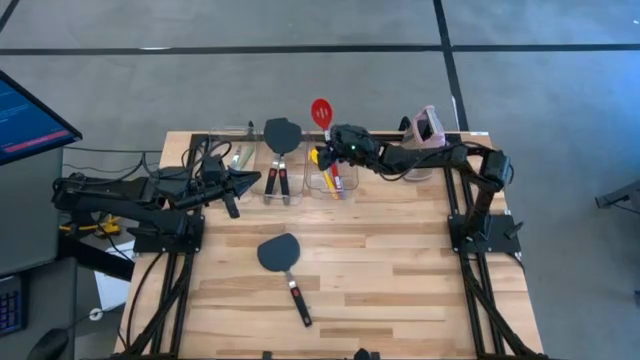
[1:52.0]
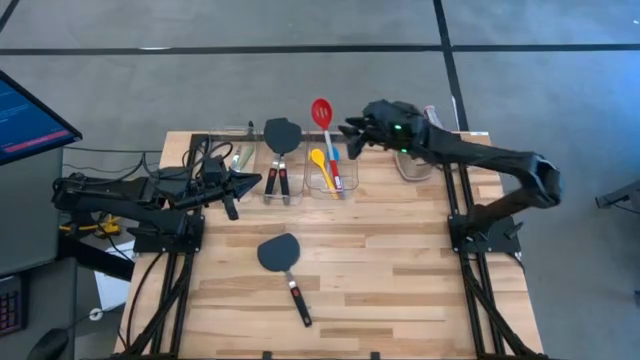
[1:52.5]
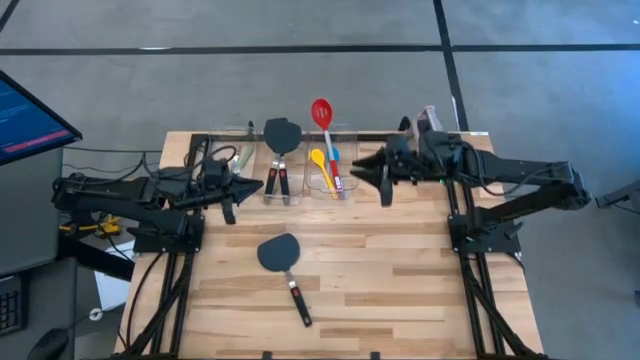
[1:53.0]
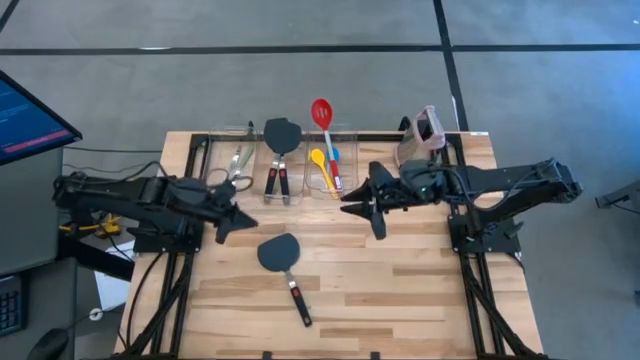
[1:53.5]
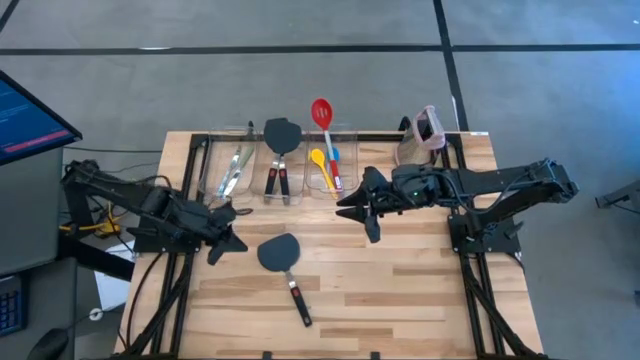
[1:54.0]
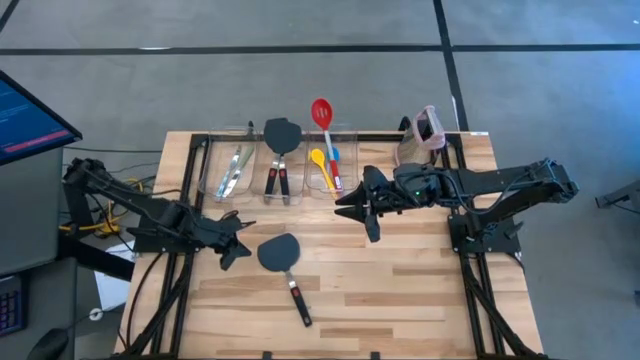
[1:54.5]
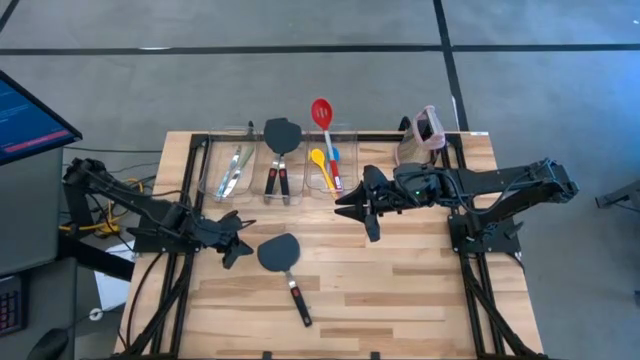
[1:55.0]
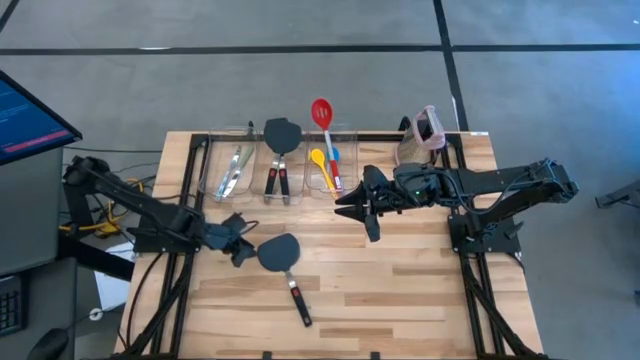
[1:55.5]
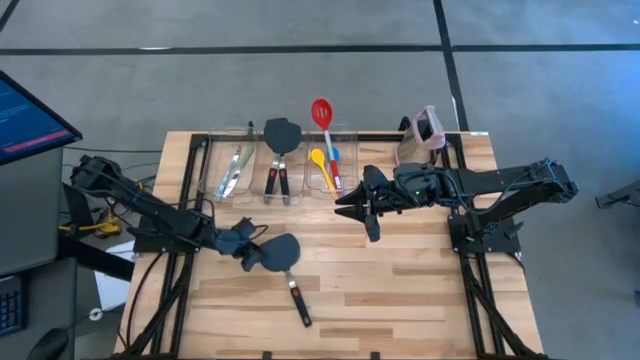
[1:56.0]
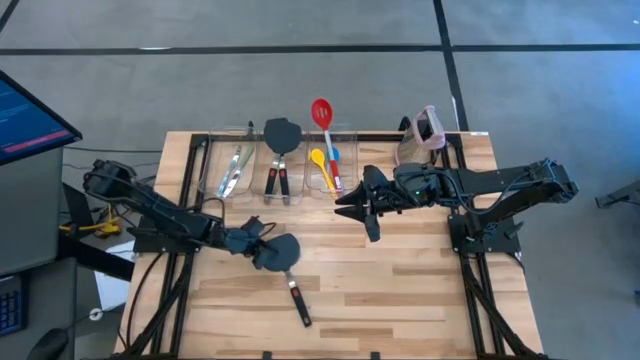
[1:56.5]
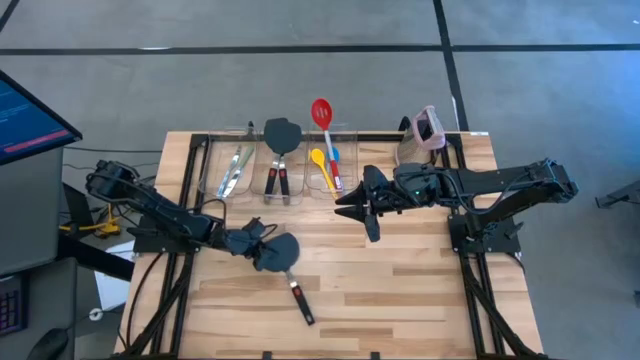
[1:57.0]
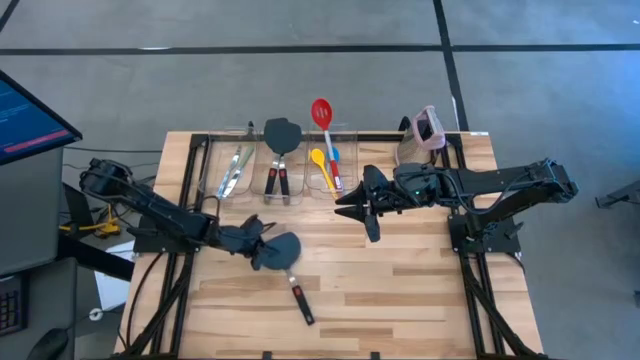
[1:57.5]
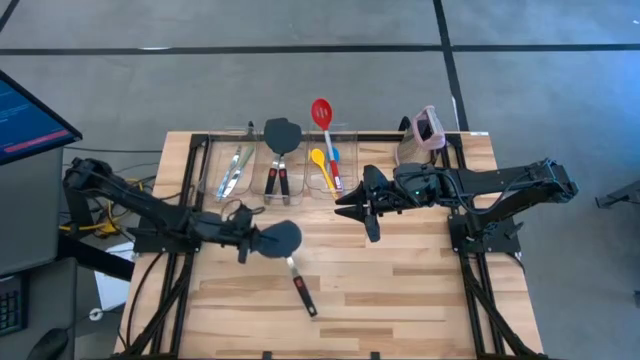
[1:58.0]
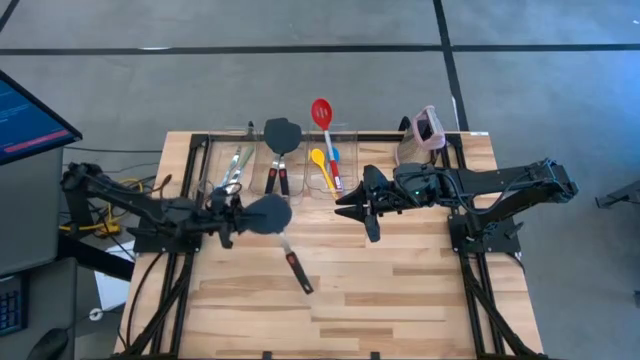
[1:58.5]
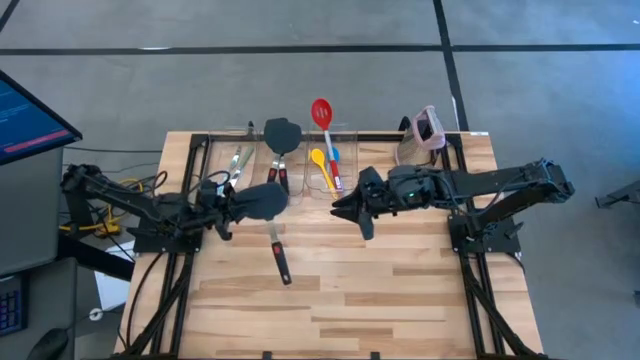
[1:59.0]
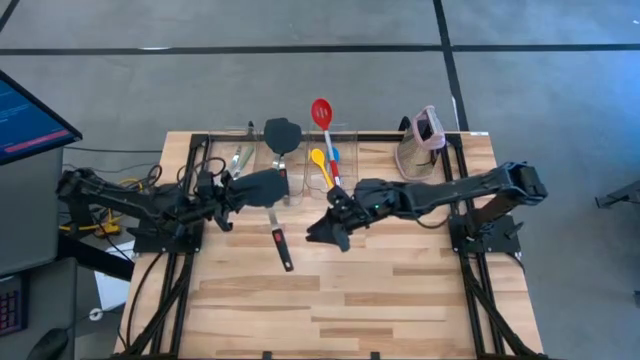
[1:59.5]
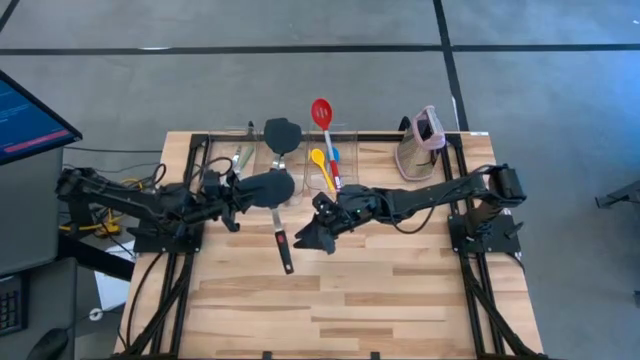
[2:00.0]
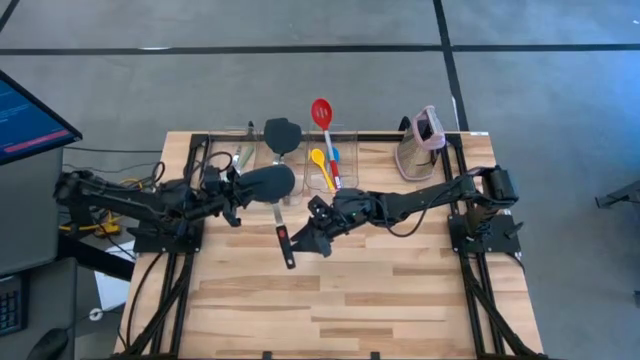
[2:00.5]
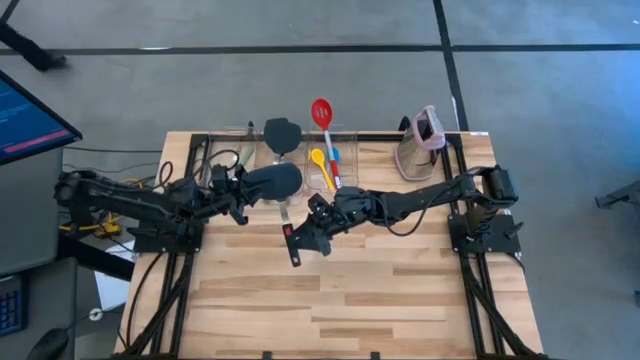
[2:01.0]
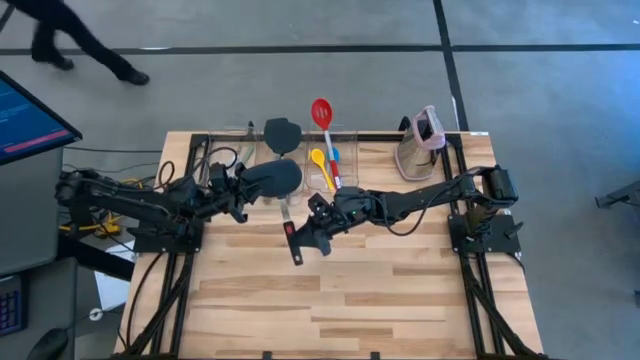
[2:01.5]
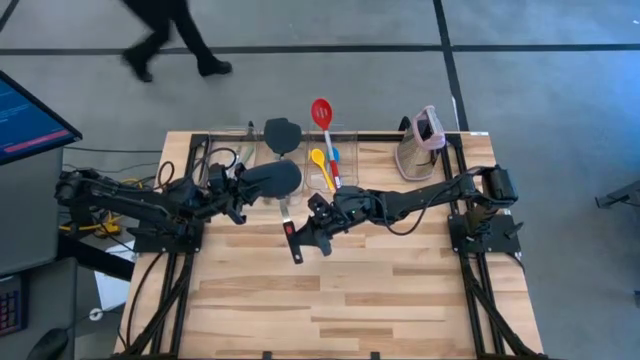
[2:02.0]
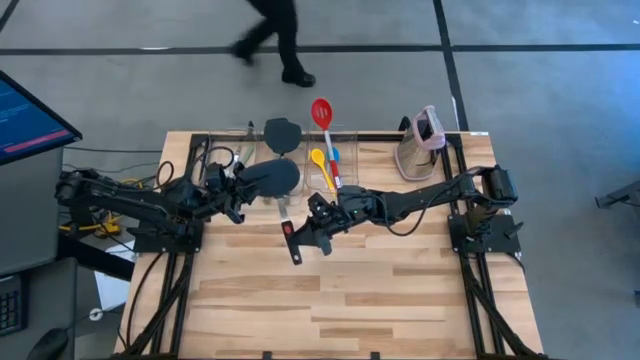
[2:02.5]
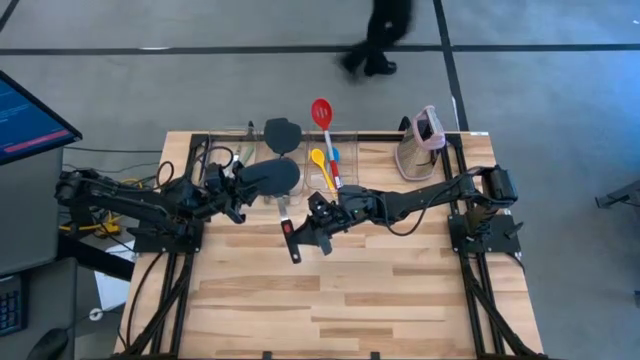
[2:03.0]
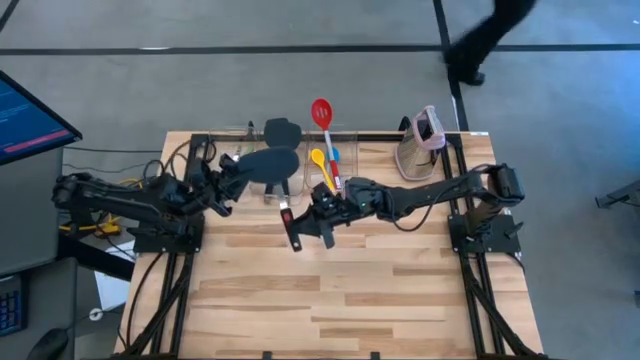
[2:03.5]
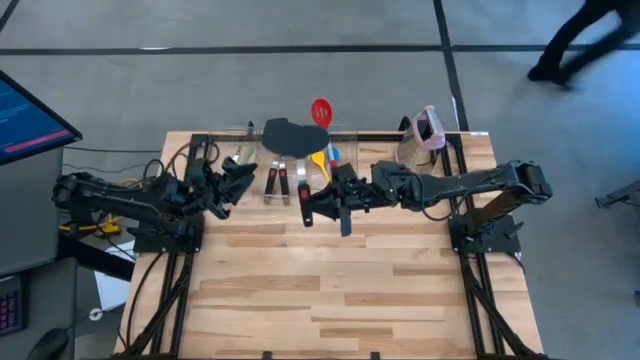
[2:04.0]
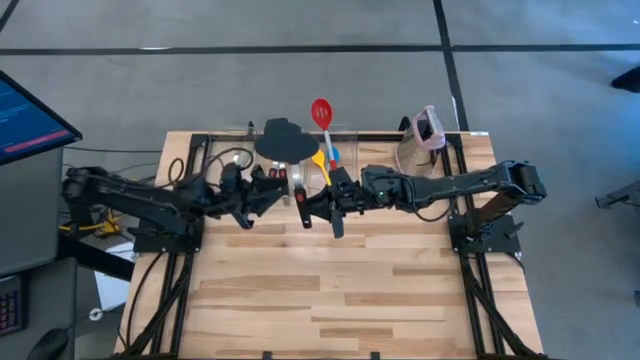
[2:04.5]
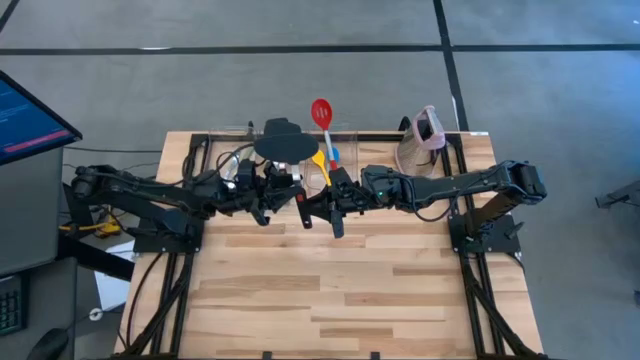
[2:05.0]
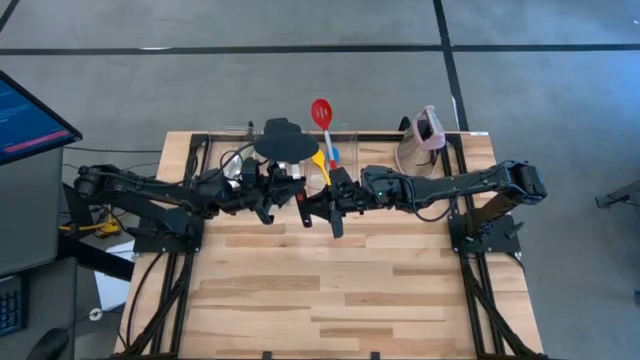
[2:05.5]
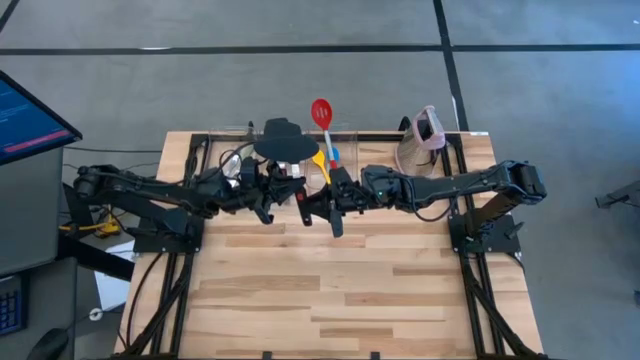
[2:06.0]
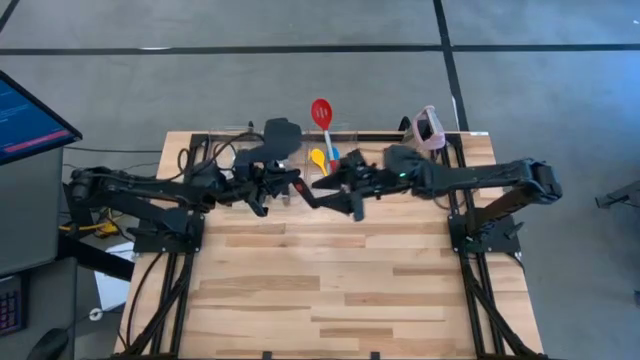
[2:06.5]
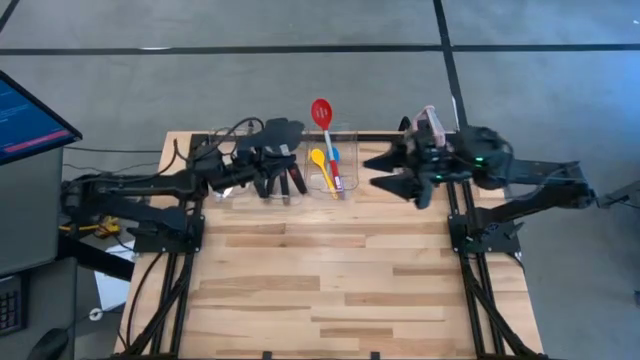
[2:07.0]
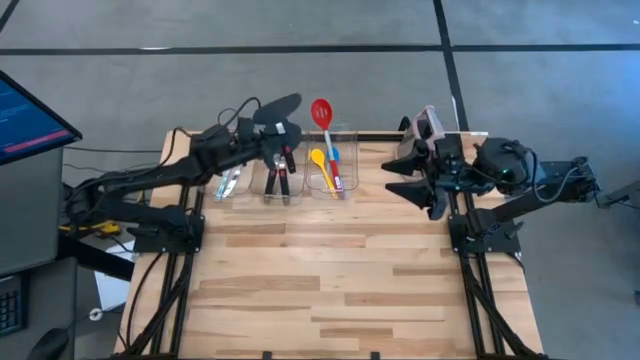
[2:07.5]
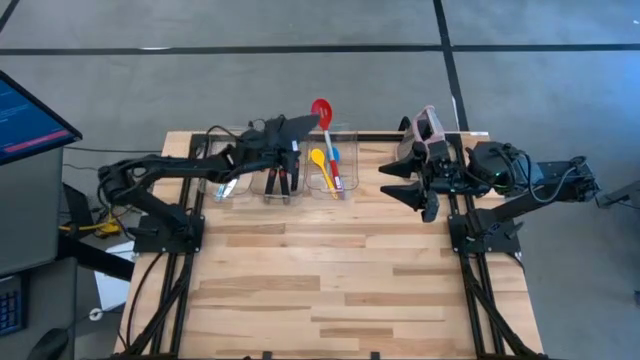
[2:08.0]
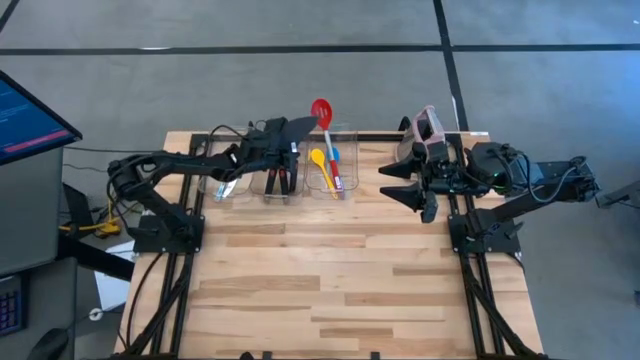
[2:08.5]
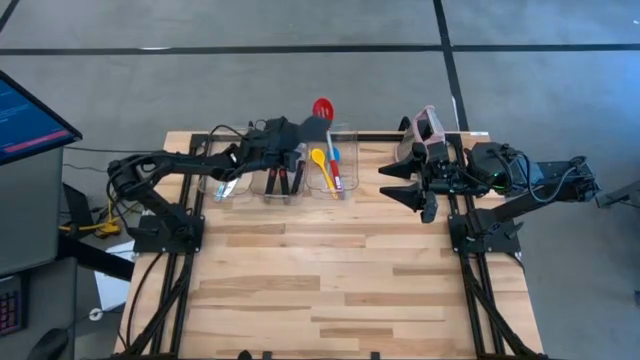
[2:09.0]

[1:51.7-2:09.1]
Task: Pick & Place Kitchen Items
Put the black spatula into the middle transparent bin

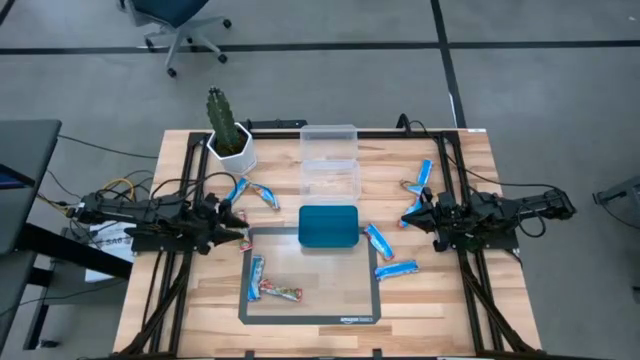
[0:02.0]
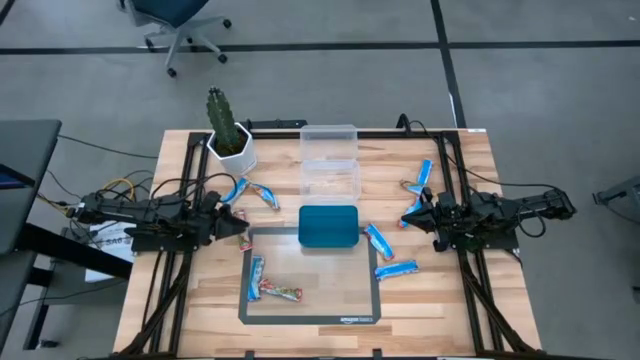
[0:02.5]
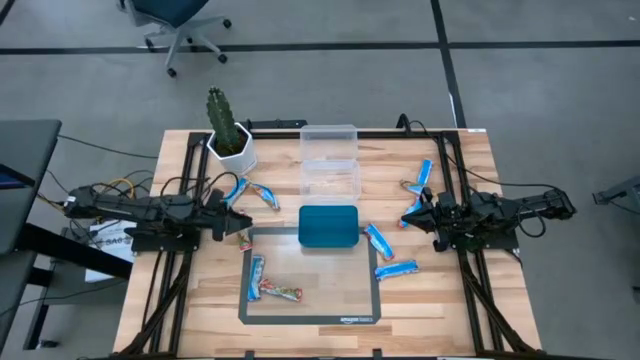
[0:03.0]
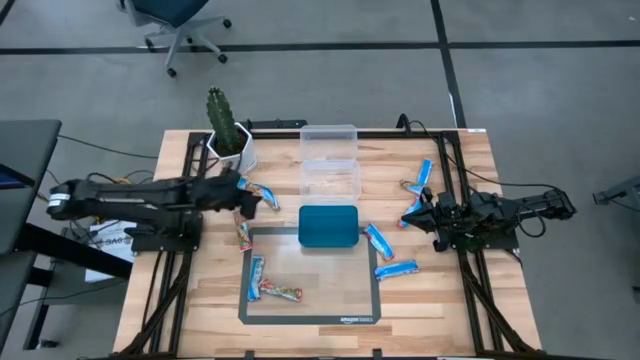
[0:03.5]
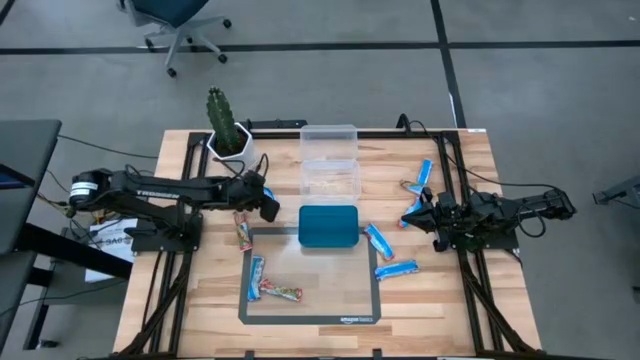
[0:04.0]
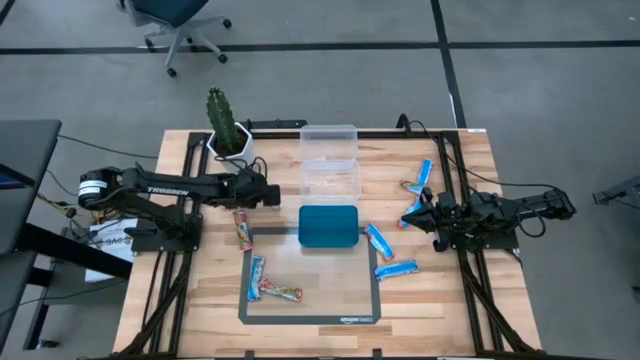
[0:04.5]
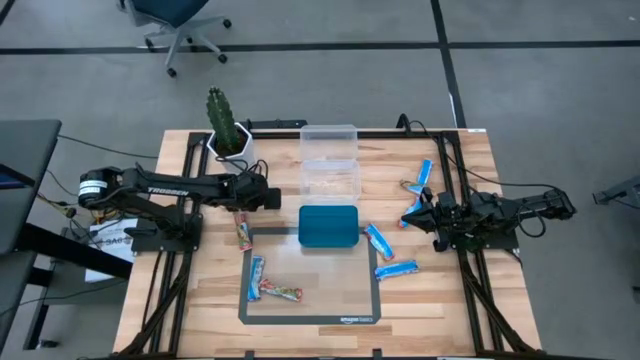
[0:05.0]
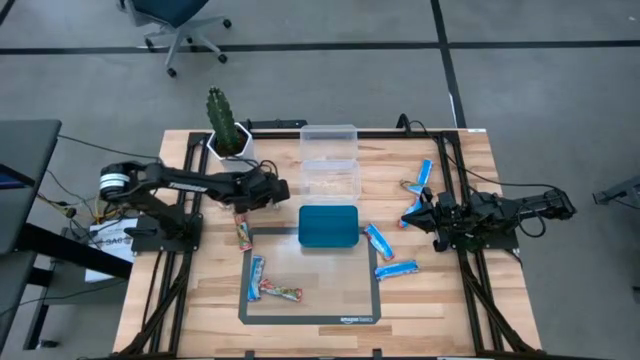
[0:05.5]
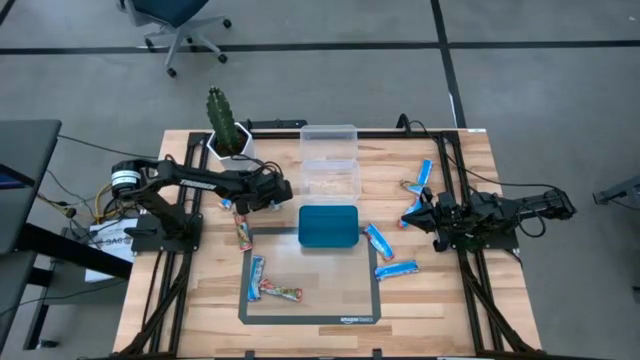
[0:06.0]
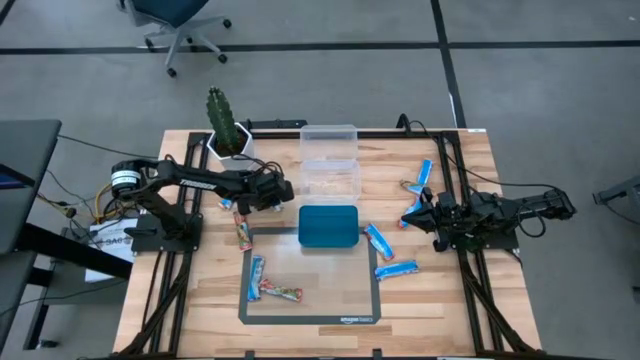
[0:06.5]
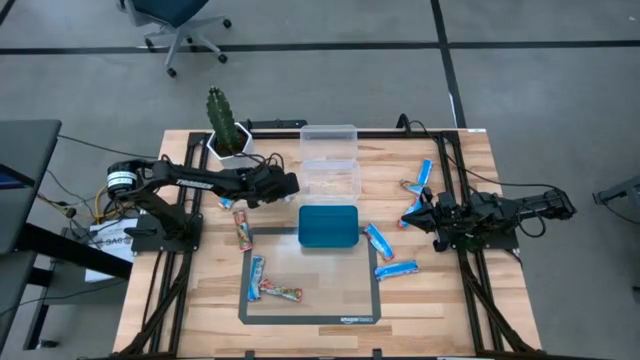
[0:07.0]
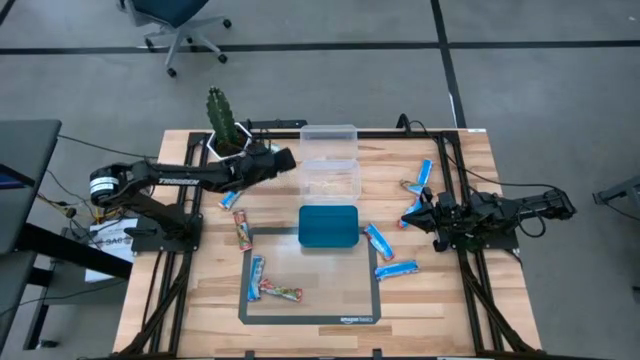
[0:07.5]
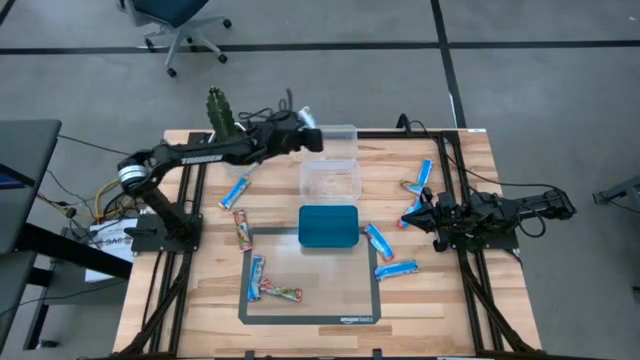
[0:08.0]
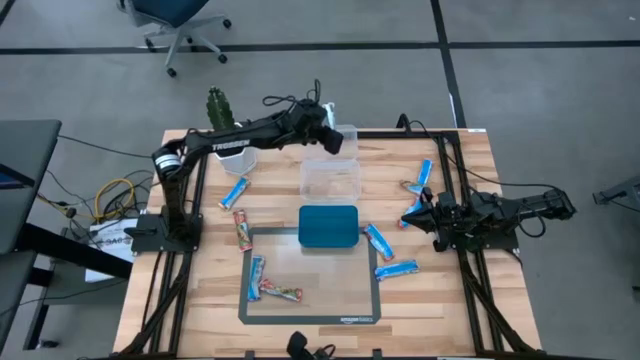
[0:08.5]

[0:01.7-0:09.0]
Task: Pick and place Granola Bars by type
Put the yellow granola bar into the top transparent bin
